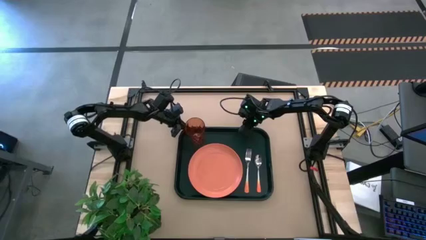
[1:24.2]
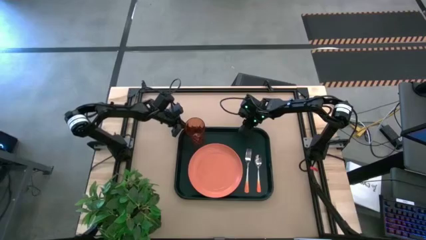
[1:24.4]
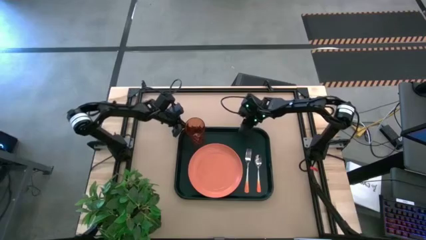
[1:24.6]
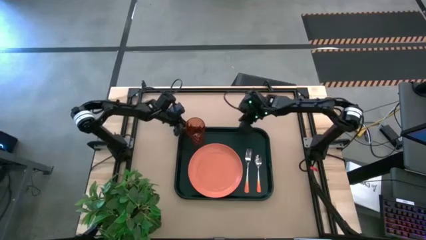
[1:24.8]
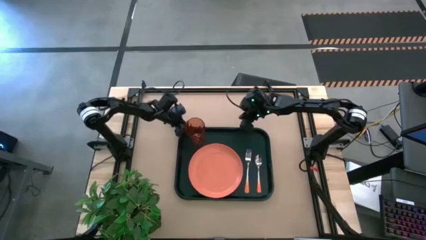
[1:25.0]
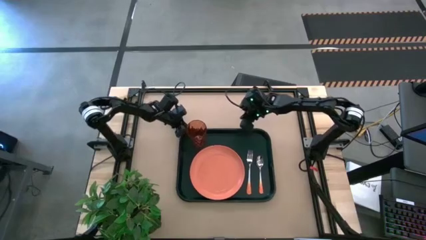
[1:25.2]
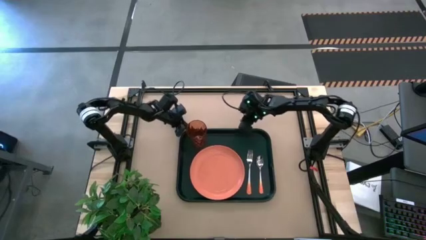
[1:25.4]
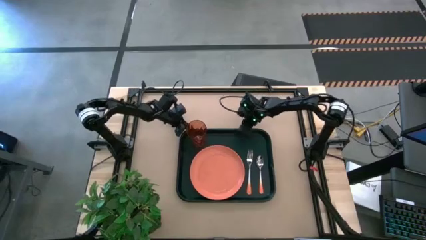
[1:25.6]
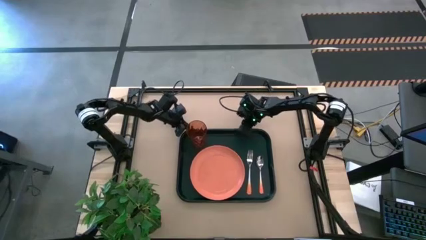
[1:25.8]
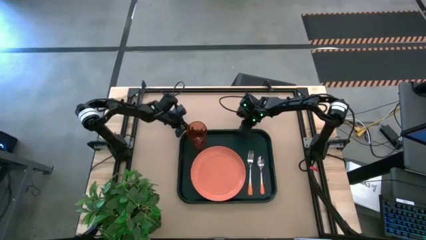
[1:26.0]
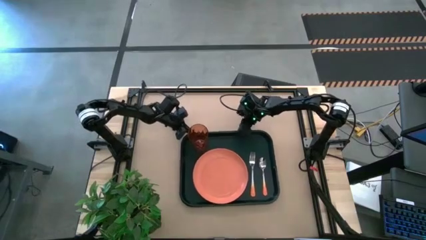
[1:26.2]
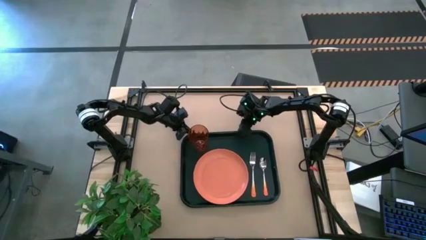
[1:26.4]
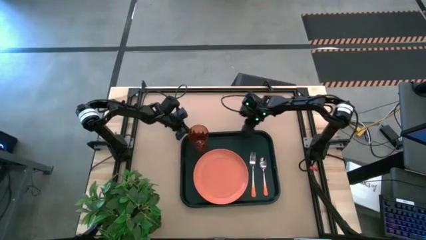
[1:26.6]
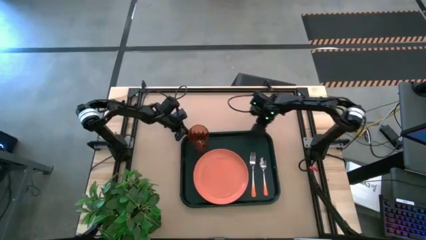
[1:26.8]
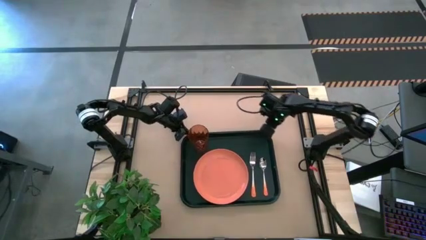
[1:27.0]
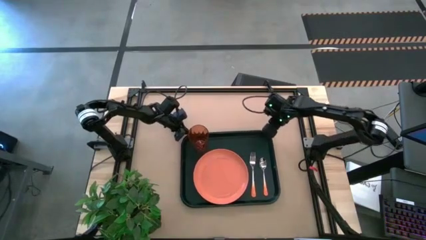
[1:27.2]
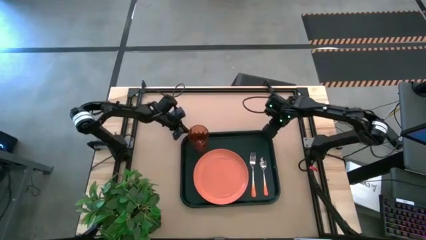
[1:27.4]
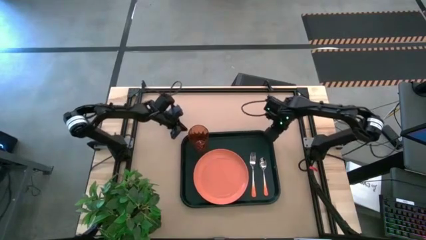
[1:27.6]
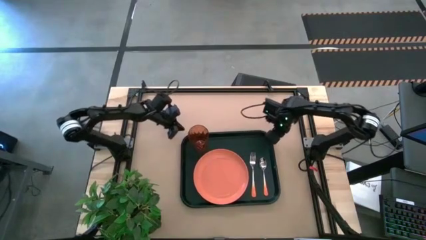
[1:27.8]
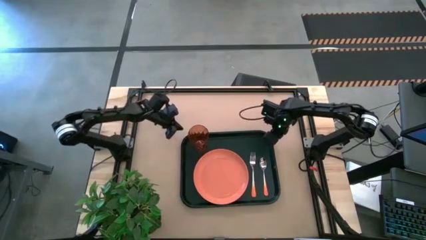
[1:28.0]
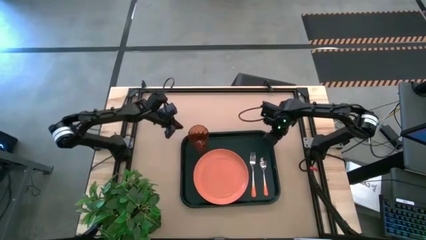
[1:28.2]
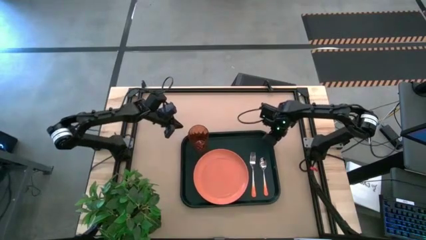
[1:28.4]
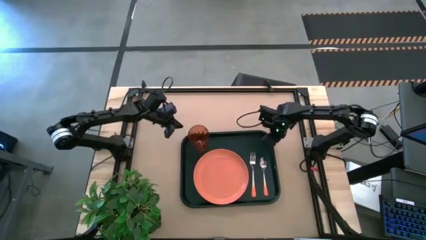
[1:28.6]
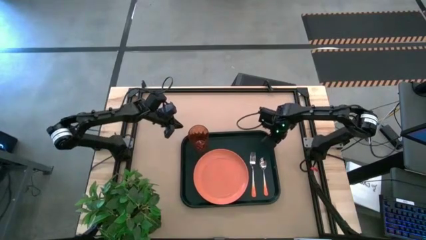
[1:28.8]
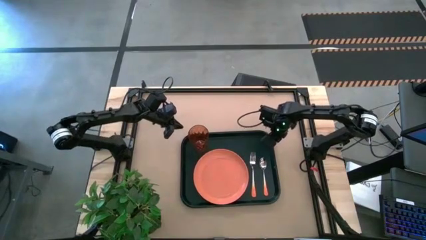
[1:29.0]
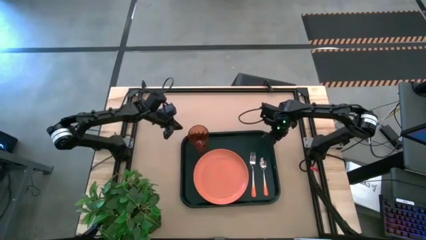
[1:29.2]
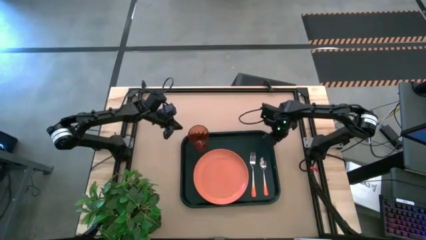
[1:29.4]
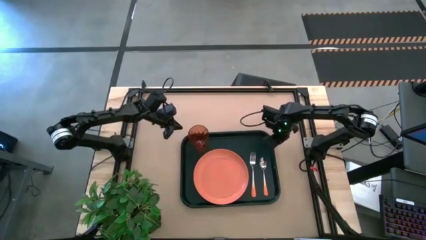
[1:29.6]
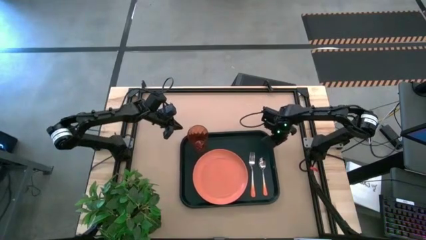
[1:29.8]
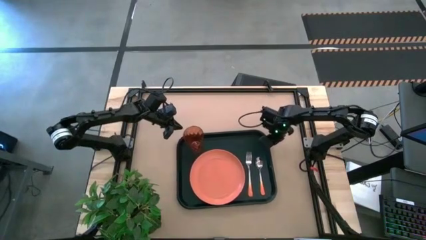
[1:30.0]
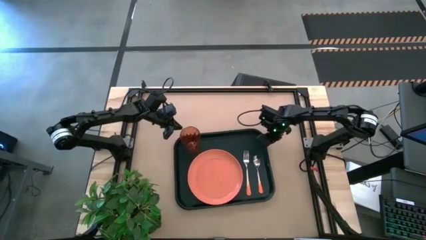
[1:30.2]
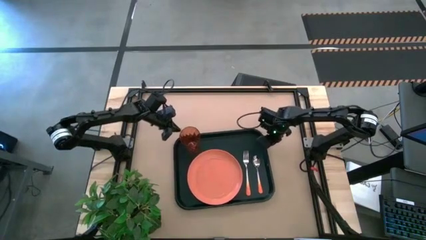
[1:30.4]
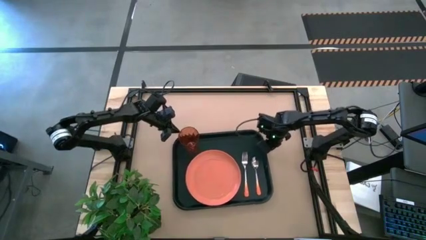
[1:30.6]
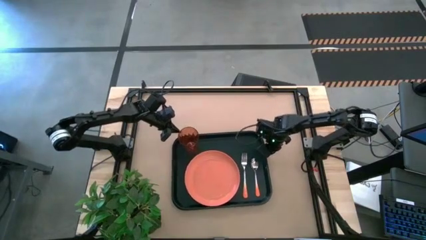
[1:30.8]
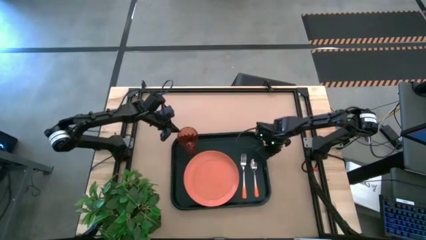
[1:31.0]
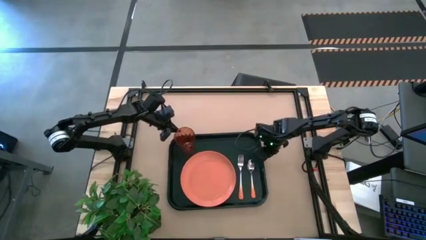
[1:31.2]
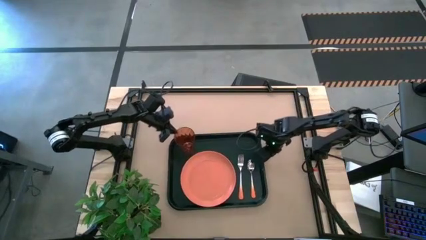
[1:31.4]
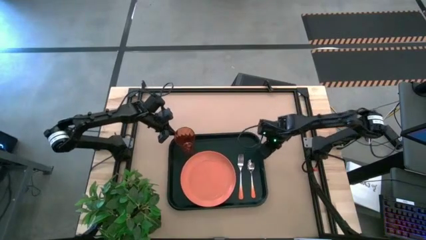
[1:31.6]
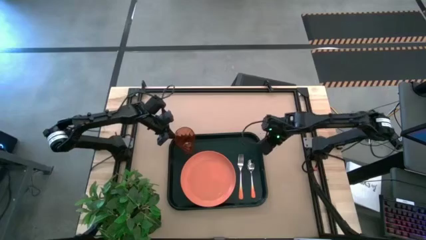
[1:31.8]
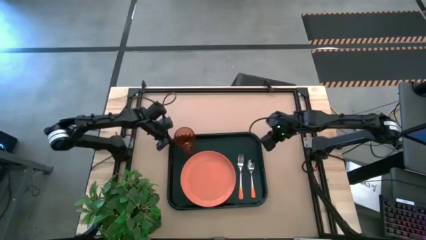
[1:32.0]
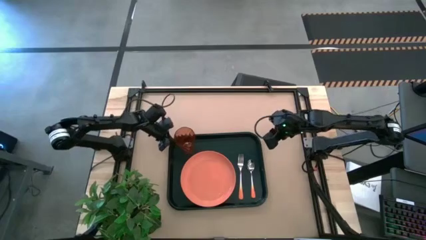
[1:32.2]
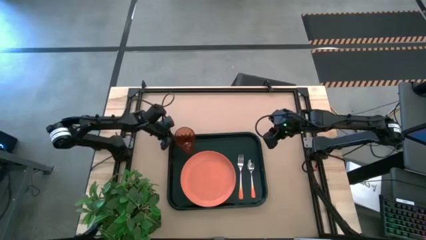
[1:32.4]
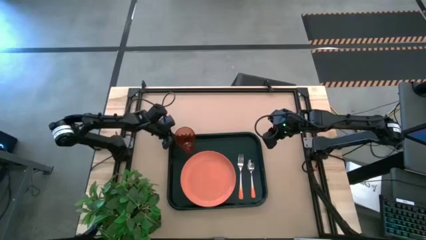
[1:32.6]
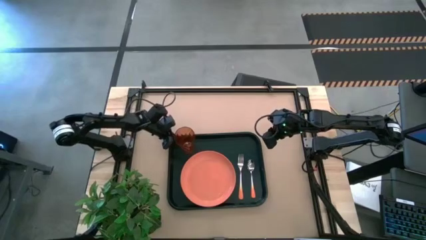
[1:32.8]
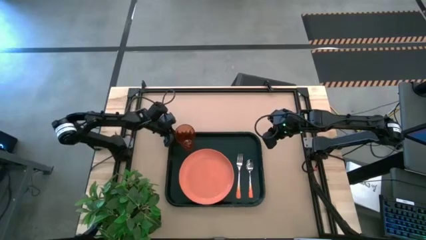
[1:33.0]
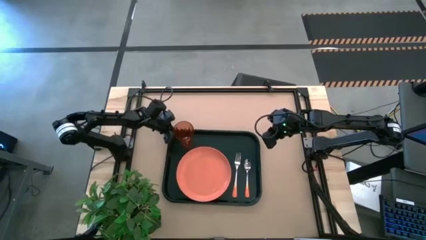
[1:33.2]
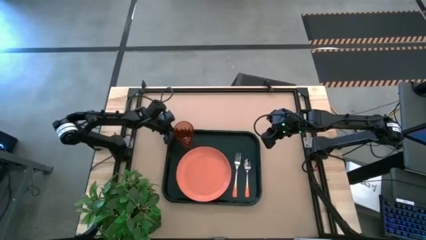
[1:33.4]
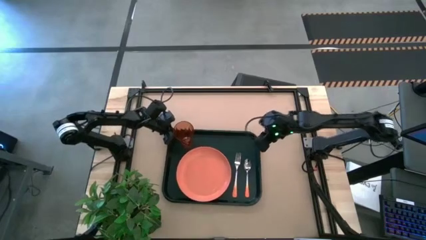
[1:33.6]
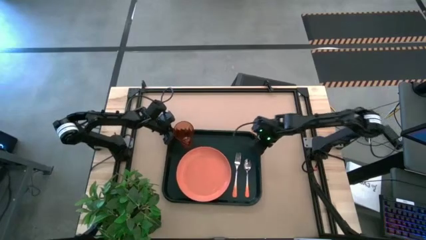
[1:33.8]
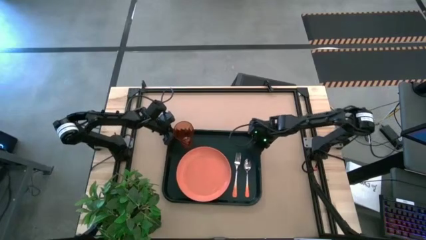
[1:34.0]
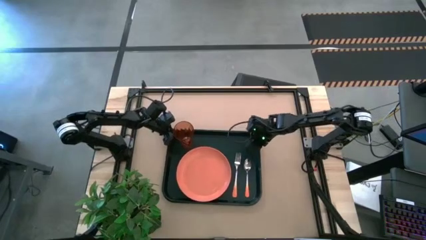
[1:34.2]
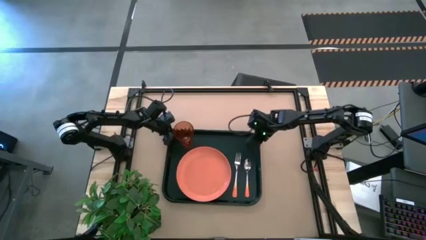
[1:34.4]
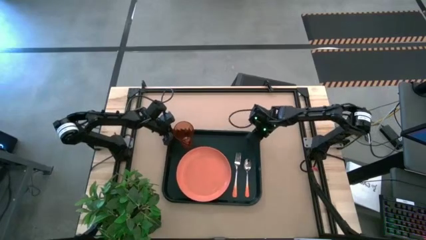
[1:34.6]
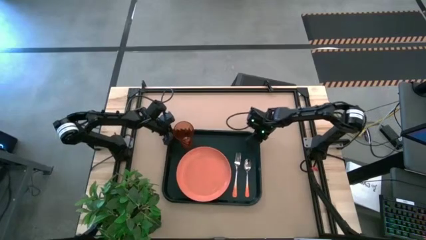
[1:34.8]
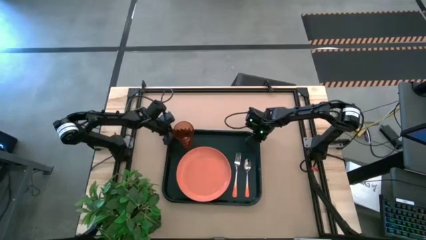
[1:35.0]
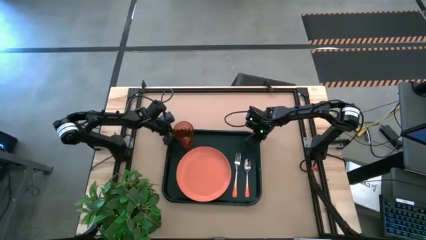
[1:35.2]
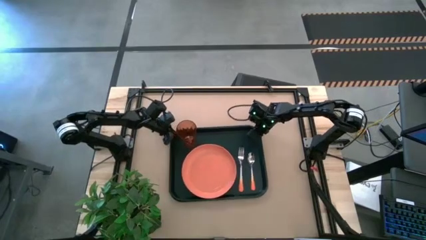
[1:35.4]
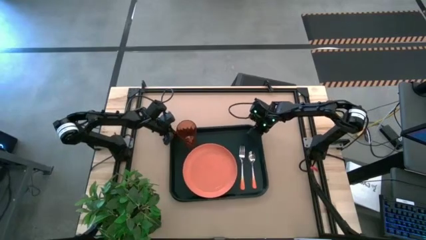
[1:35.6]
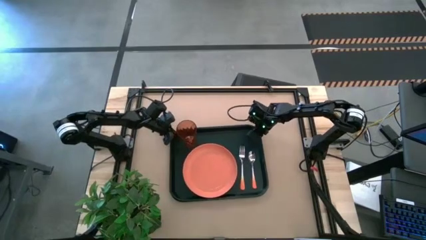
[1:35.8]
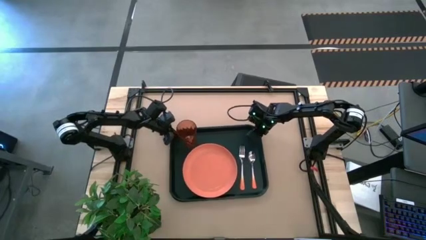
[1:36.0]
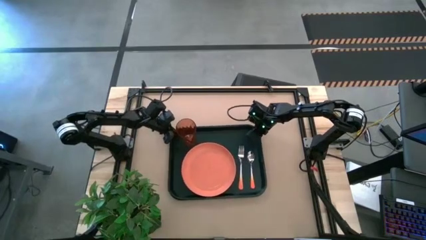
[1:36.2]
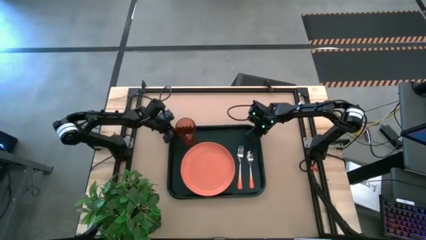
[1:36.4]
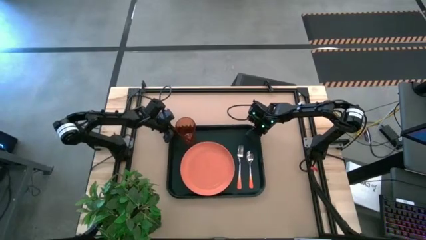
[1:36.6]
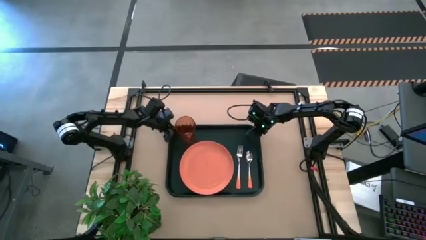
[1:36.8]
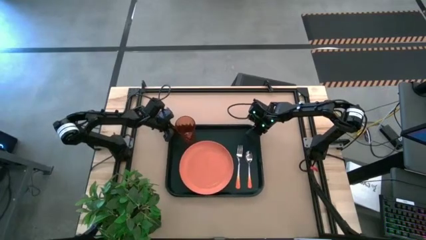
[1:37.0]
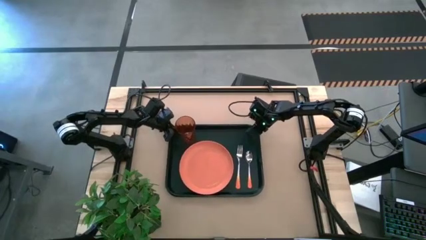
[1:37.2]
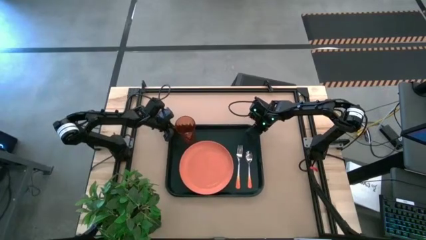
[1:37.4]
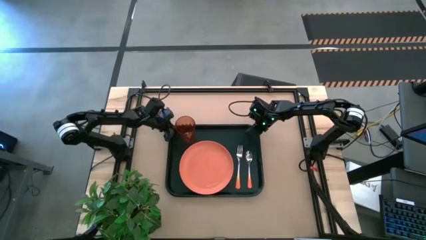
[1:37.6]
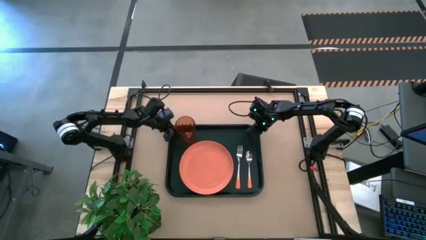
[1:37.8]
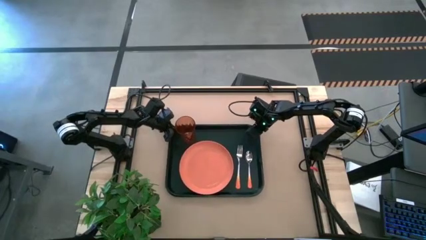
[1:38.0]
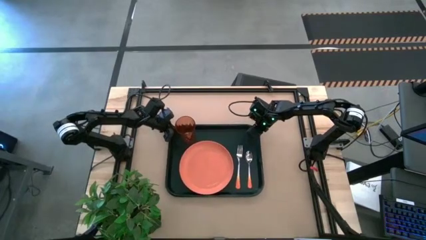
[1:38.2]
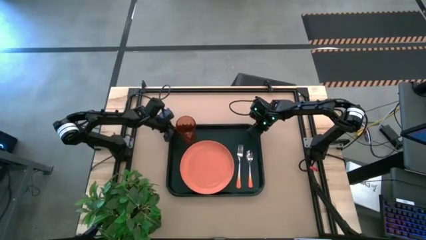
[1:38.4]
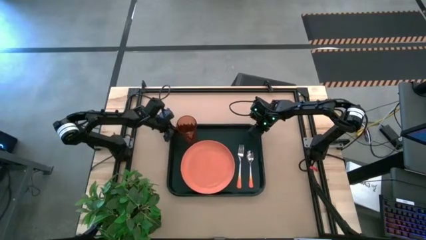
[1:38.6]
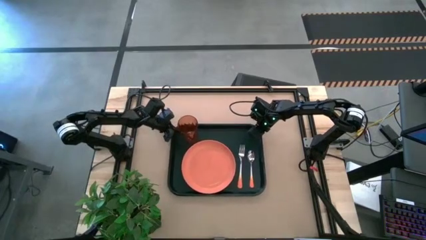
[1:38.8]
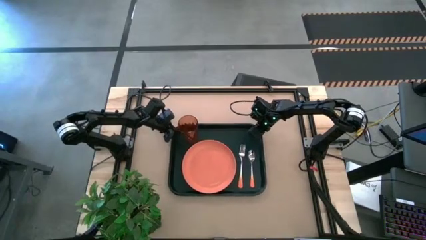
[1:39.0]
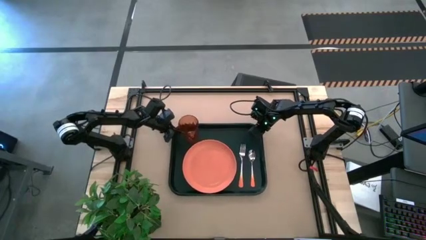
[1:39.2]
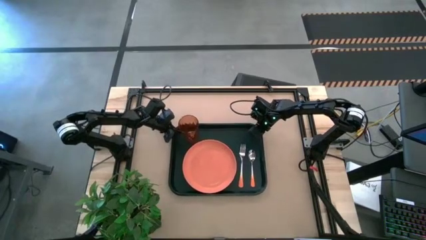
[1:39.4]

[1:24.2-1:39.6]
Task: Pick and place plate/cup/fork/spoon on tray
Adjust the black table tray
